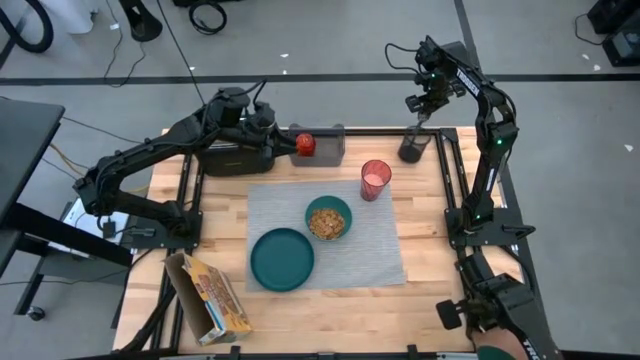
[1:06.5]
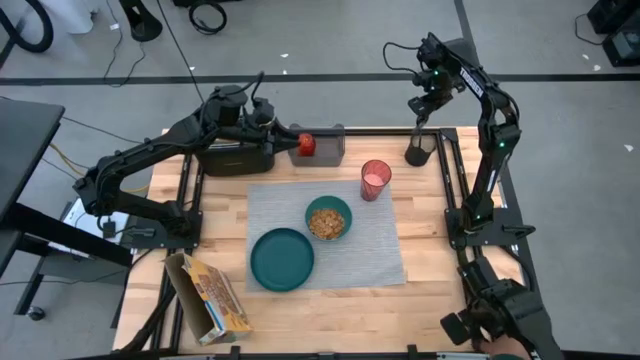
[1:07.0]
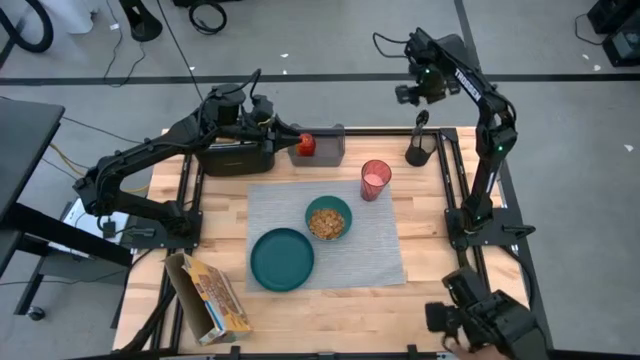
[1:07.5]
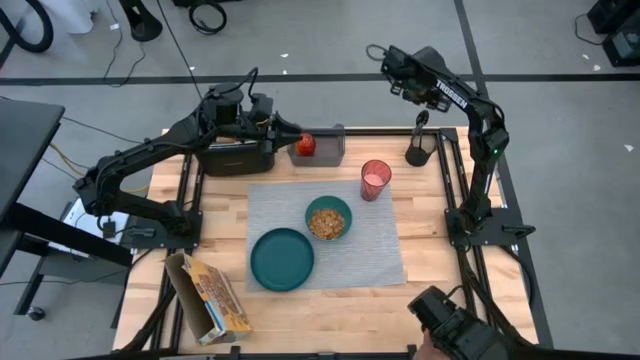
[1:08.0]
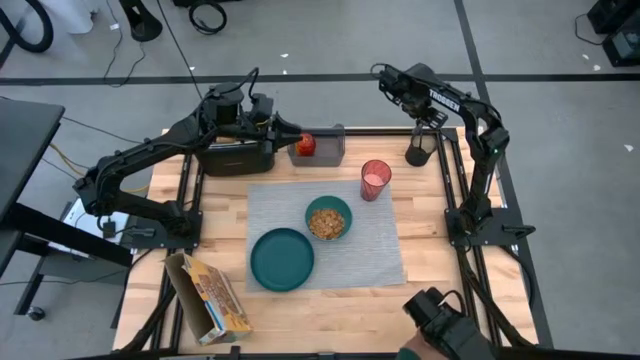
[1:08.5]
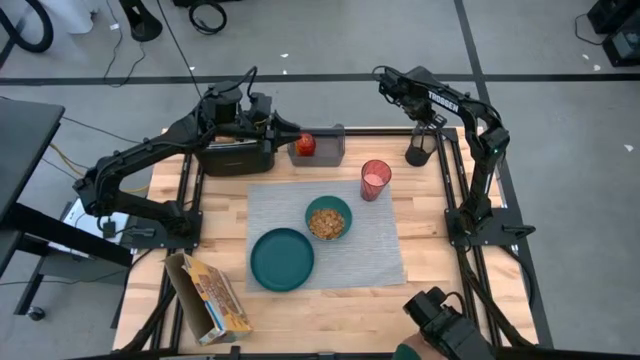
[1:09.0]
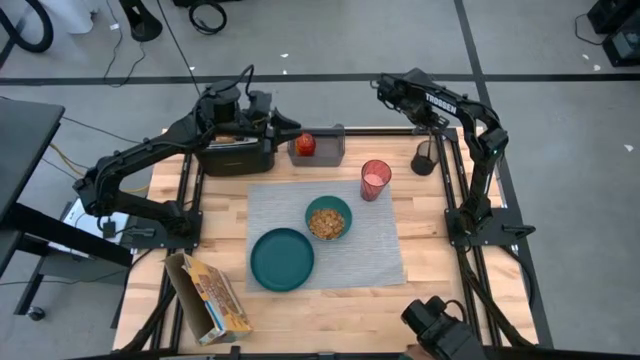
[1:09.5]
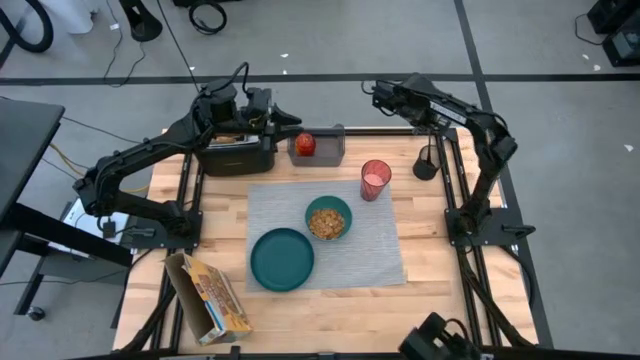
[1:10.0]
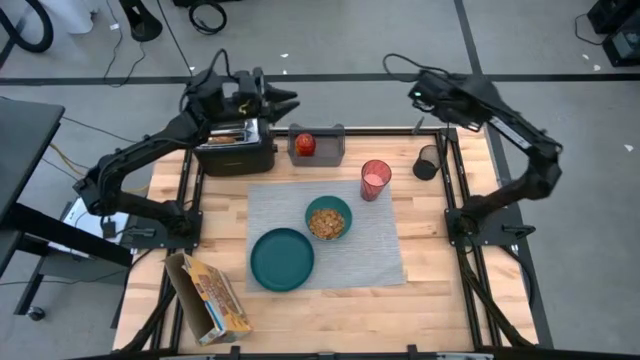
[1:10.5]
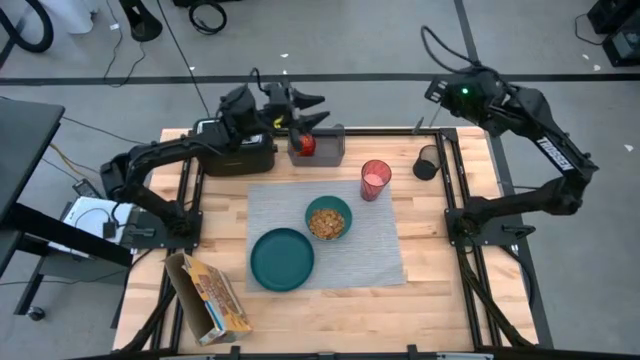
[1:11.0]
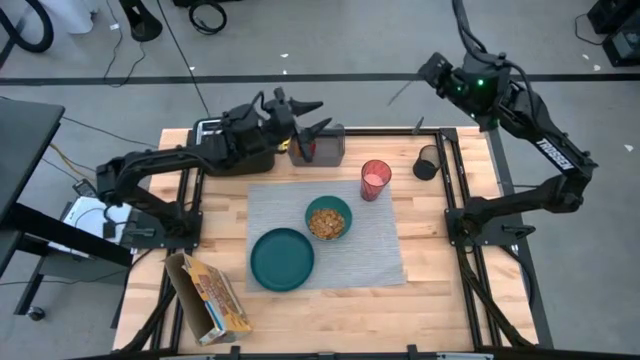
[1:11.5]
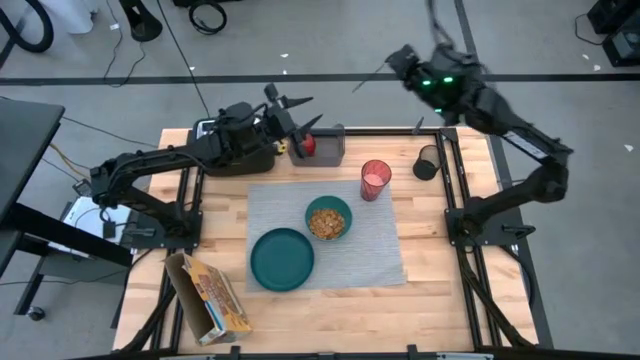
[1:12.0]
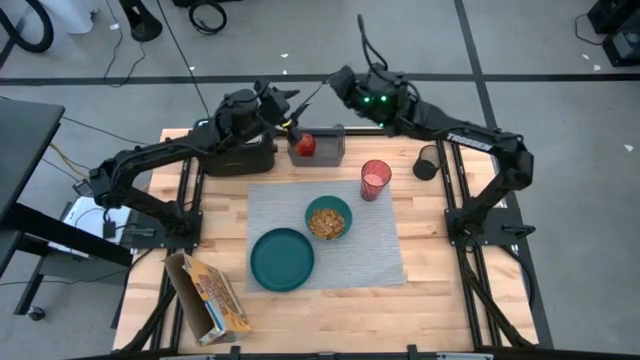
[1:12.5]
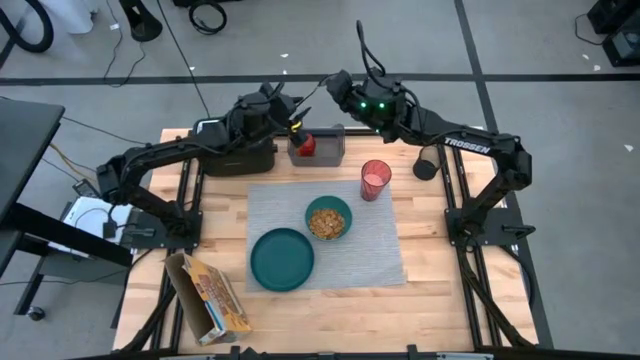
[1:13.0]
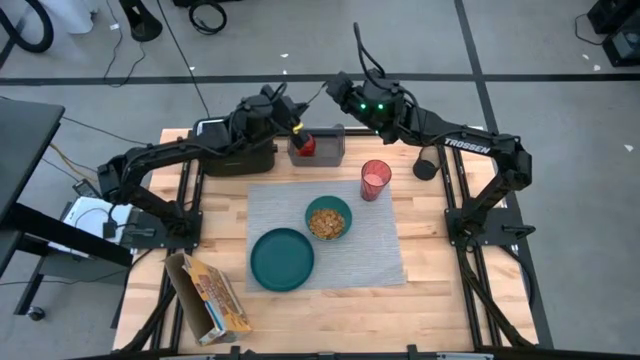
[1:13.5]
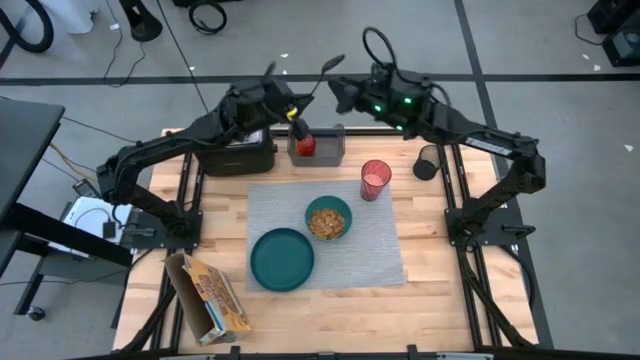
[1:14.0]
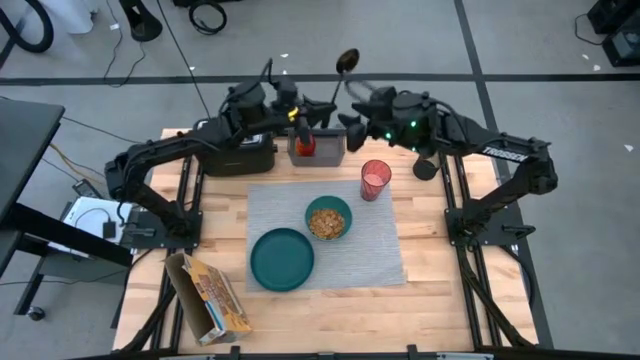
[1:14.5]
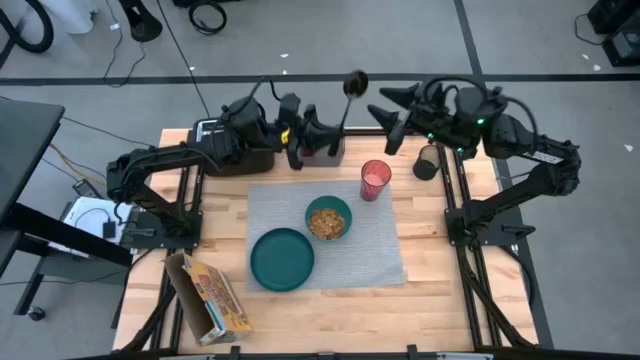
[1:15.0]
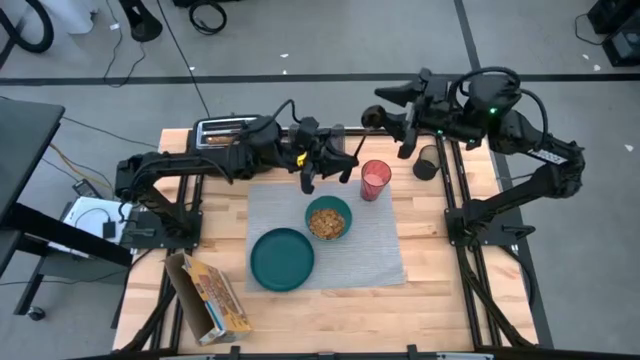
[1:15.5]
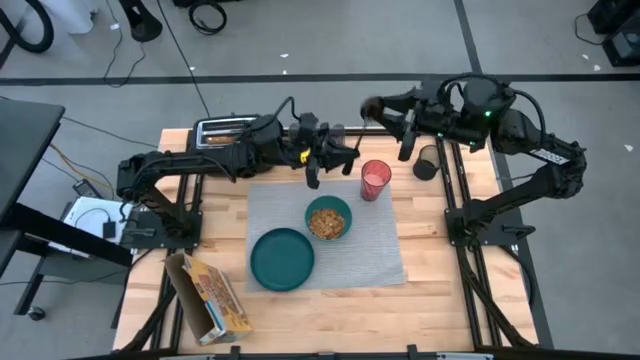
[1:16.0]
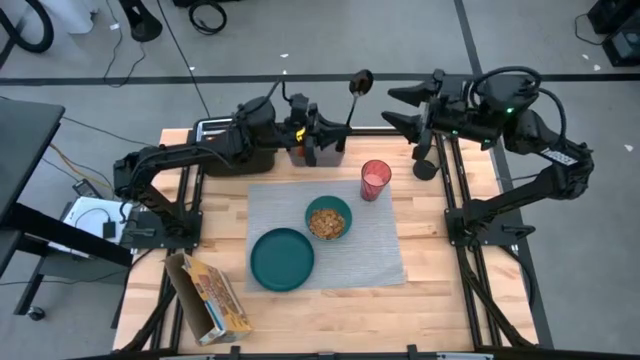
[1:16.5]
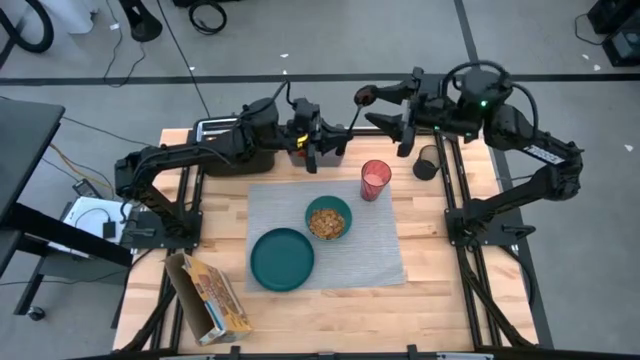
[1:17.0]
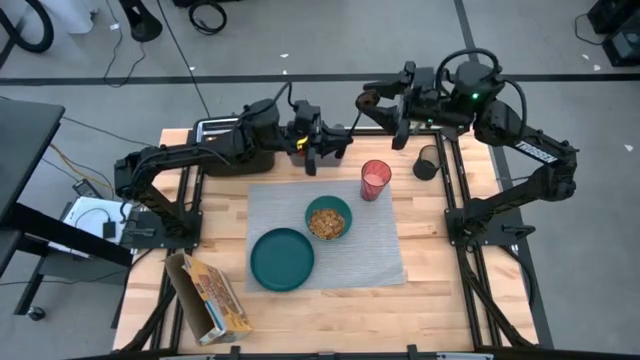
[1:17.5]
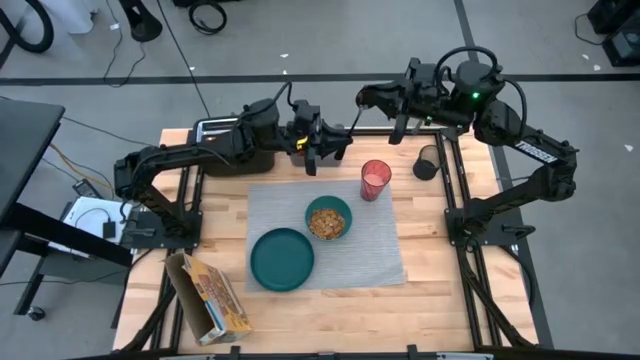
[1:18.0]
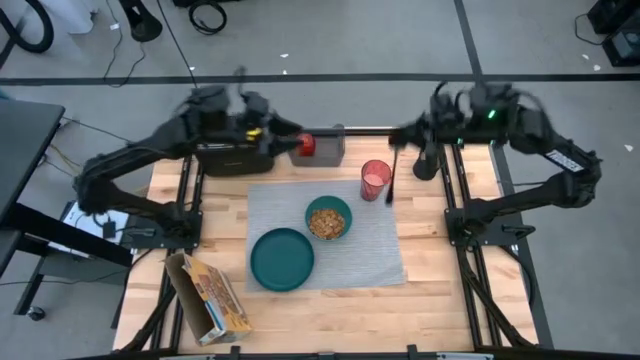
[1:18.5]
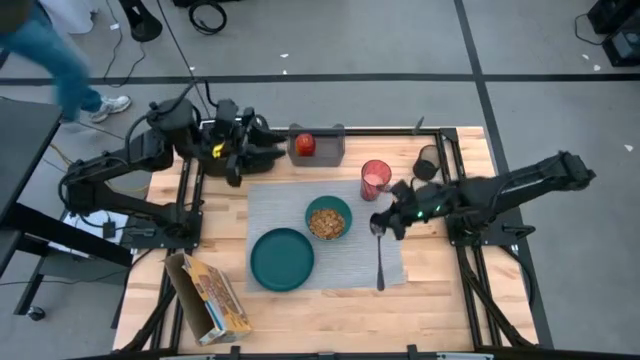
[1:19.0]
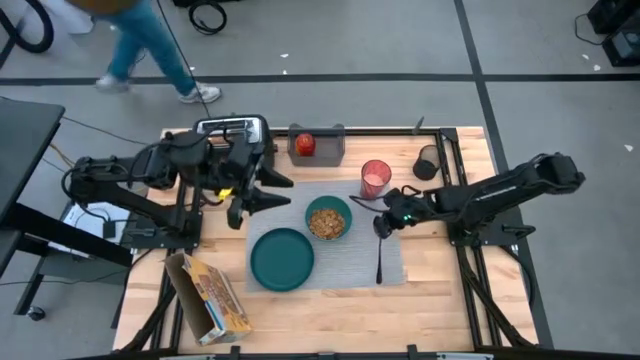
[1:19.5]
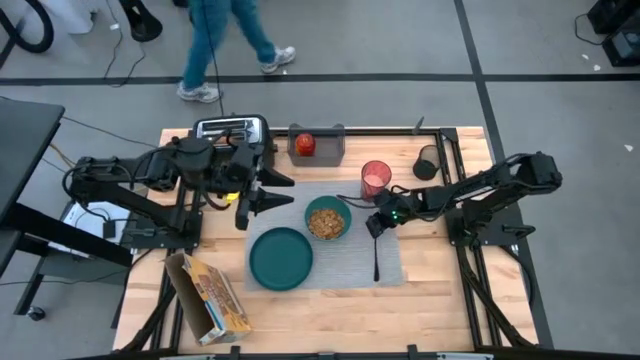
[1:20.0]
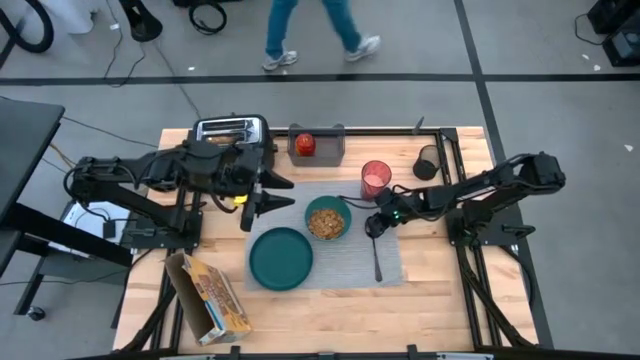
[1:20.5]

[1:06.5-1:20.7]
Task: Arrange a breakfast setting
Put the black spoon on the bottom right of the placemat

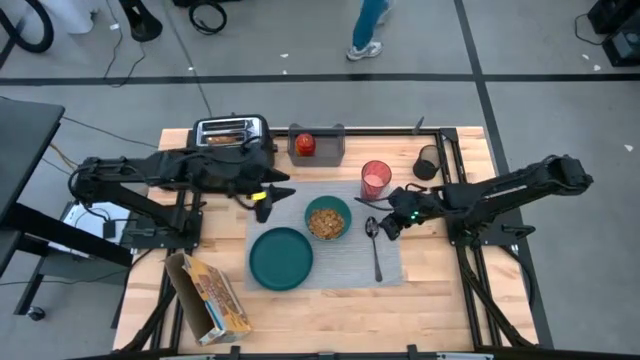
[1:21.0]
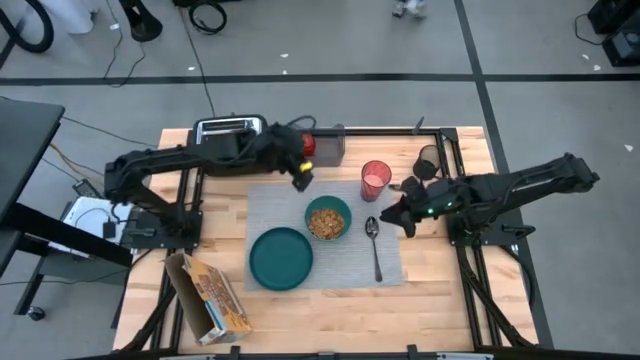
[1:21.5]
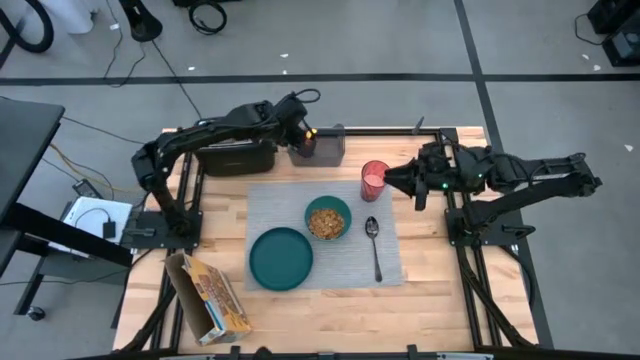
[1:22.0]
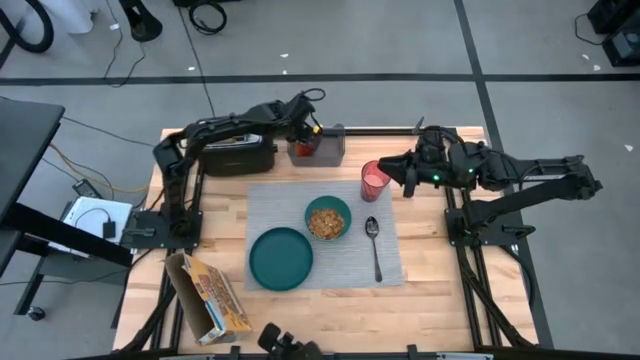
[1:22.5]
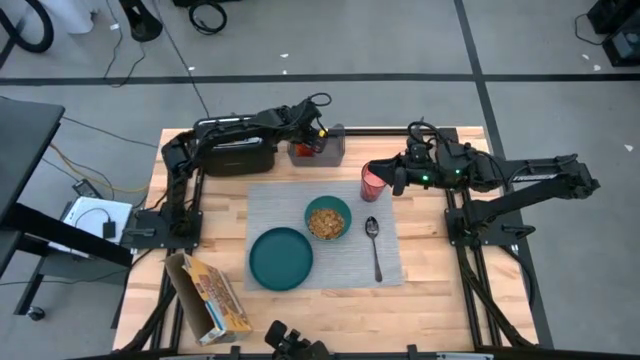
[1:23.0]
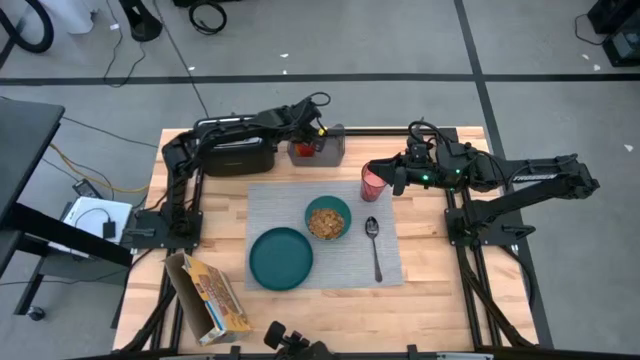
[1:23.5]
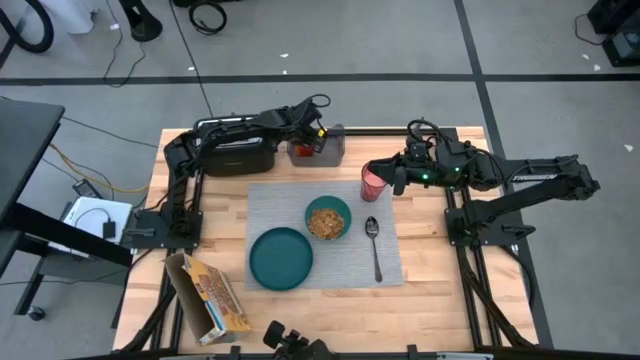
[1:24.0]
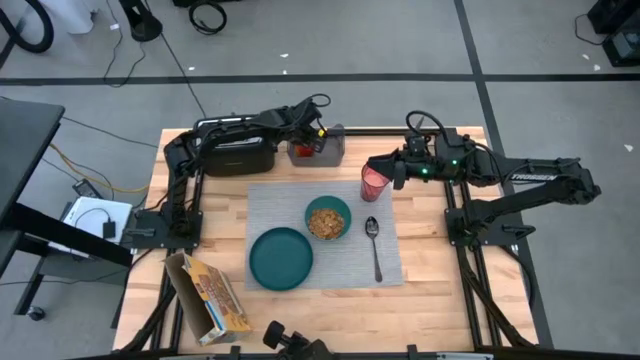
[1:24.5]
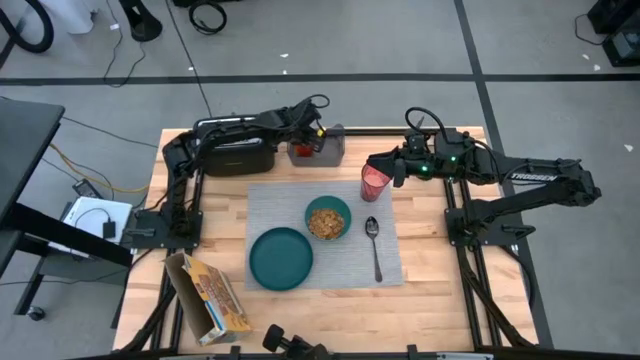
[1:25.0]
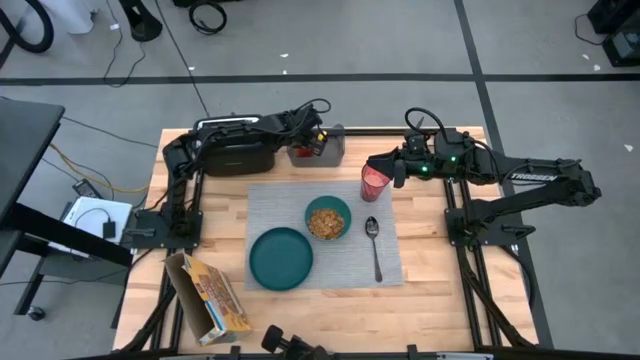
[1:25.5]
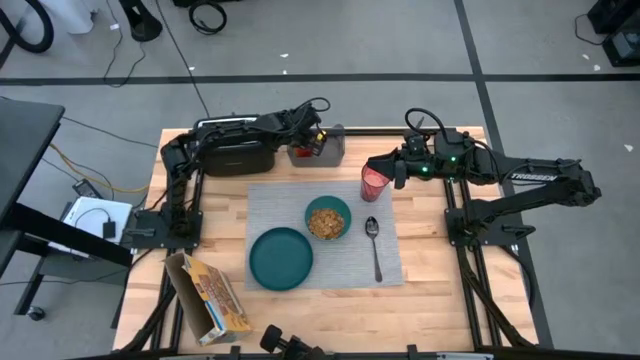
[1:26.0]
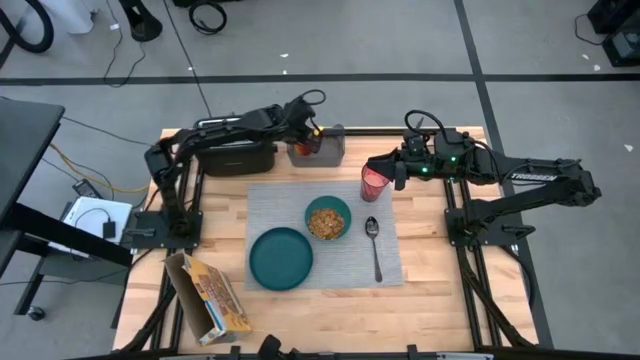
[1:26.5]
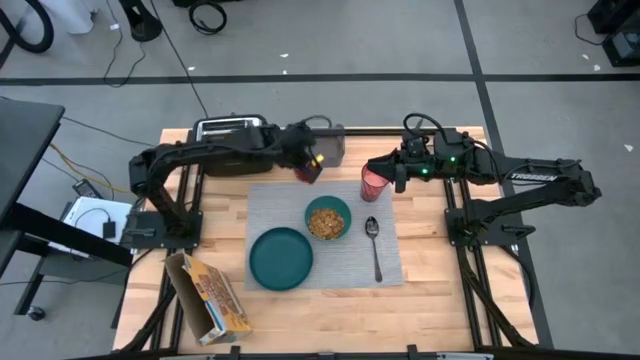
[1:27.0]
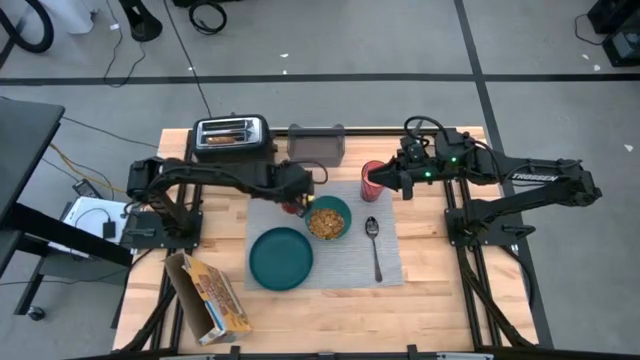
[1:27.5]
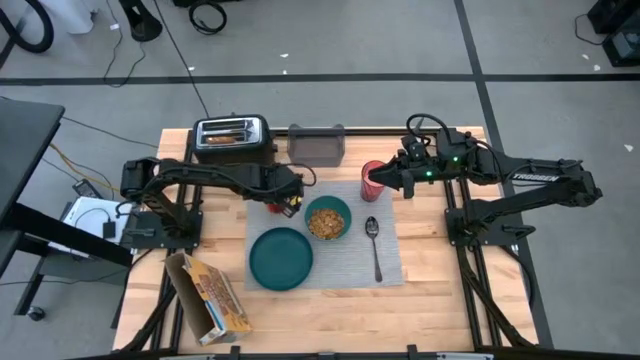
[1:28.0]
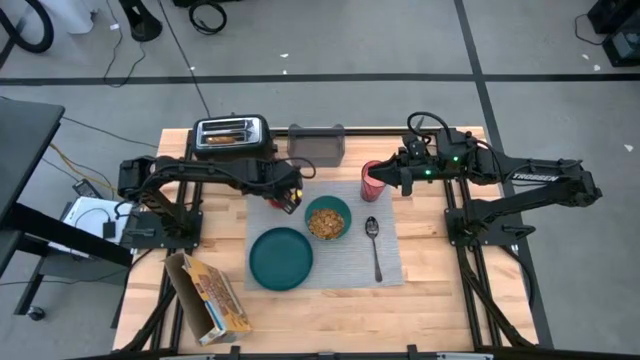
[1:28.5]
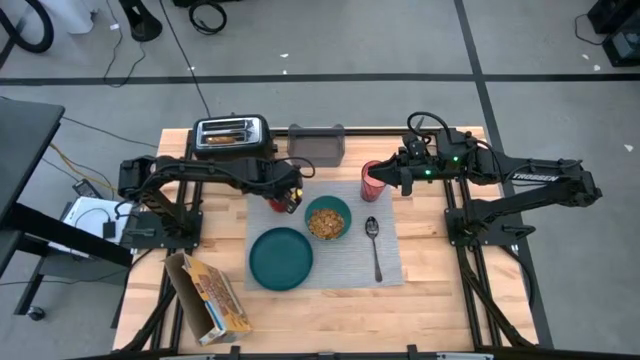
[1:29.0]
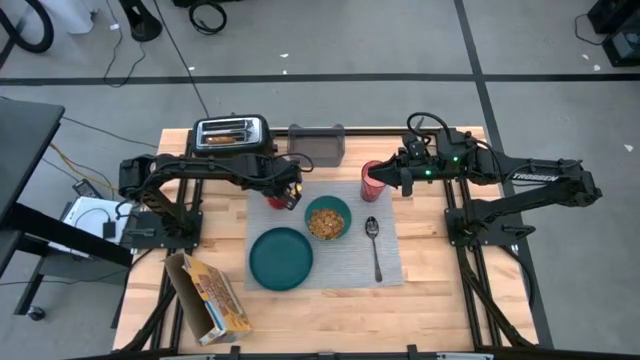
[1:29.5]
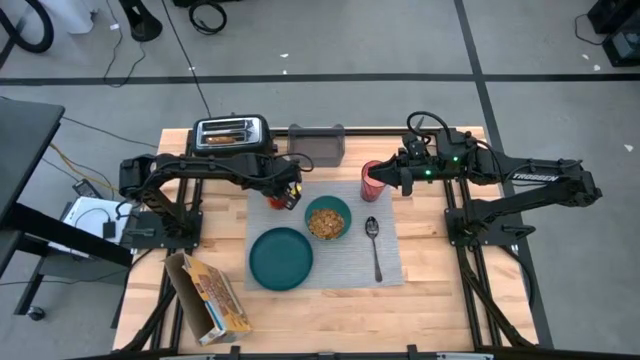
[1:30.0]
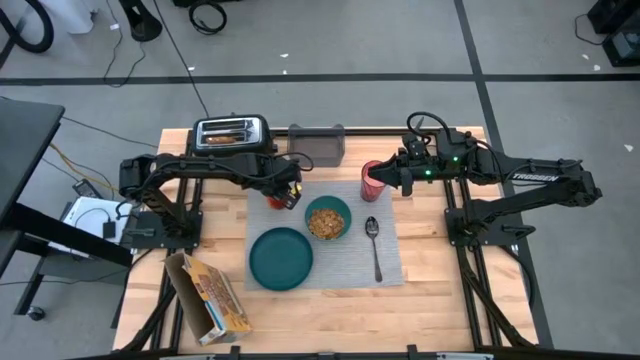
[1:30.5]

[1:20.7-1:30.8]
Put the apple on the top left of the placemat
